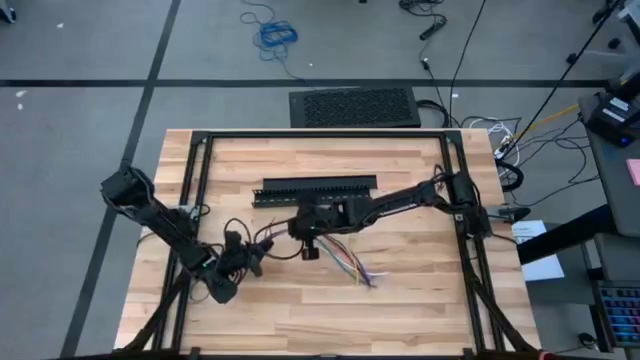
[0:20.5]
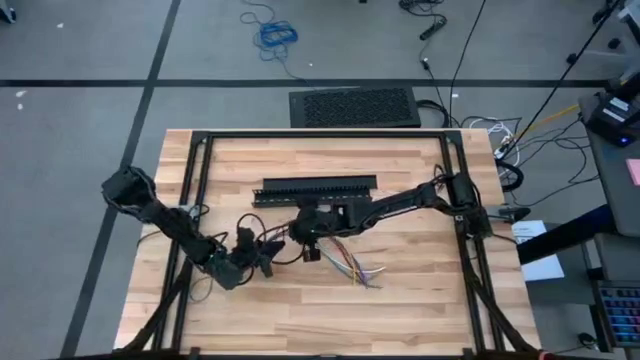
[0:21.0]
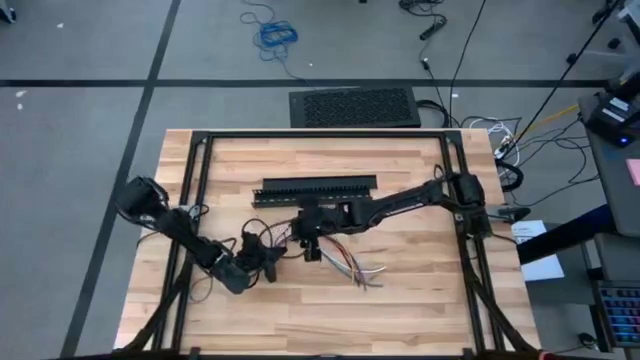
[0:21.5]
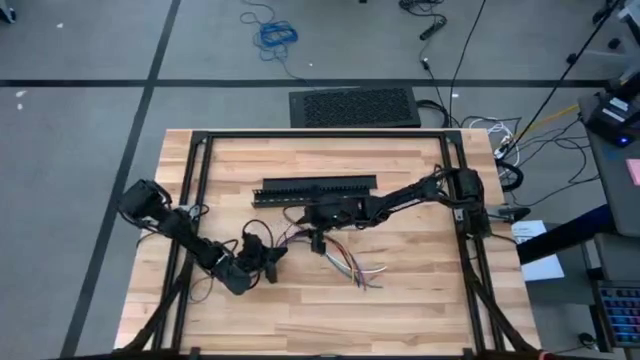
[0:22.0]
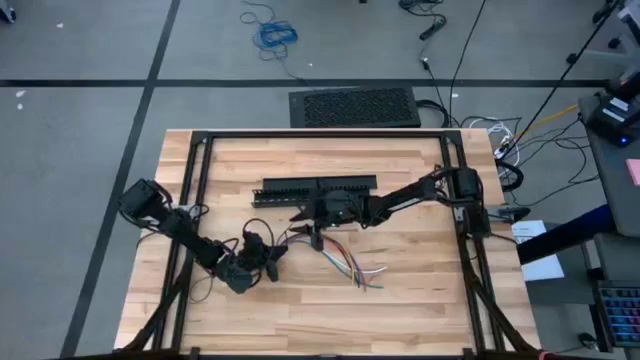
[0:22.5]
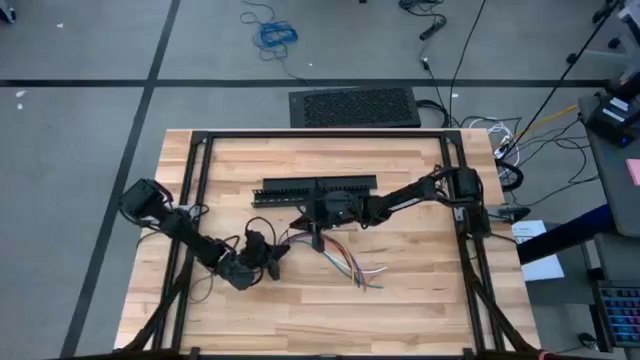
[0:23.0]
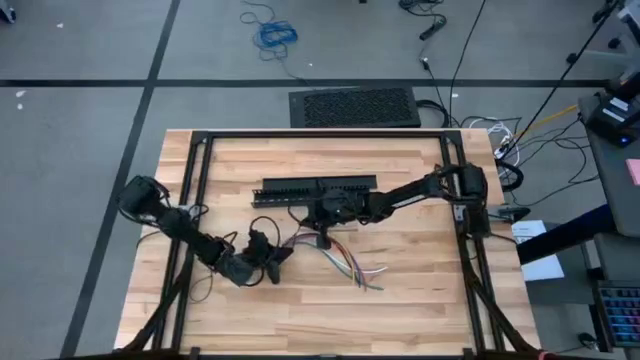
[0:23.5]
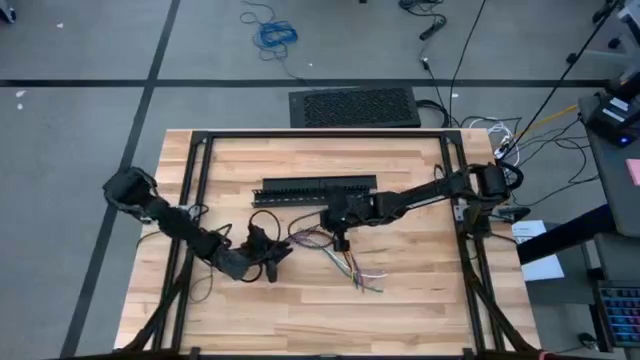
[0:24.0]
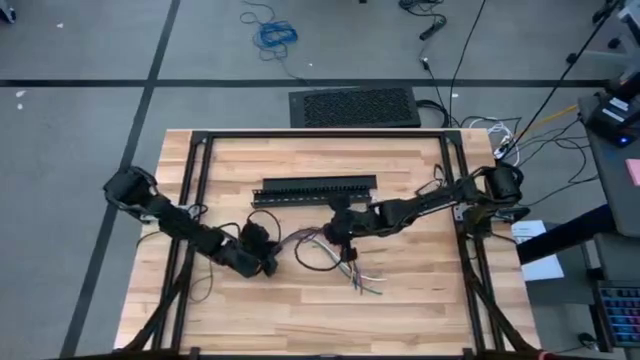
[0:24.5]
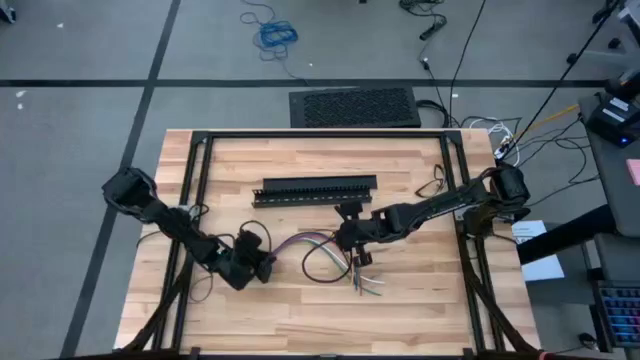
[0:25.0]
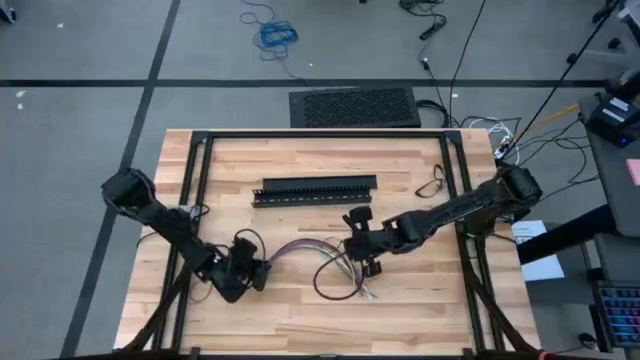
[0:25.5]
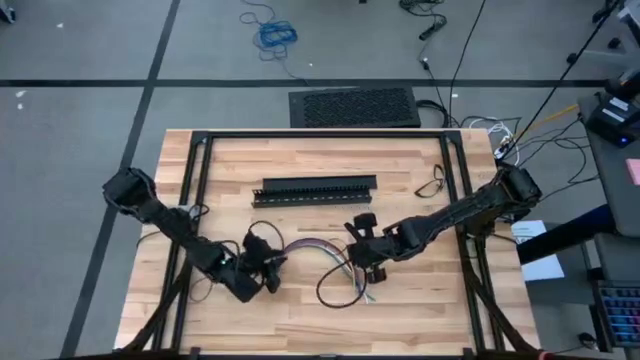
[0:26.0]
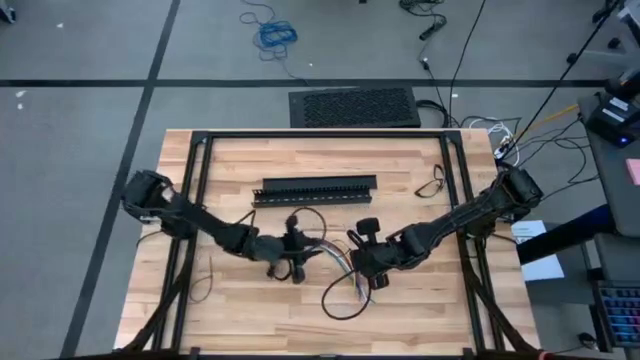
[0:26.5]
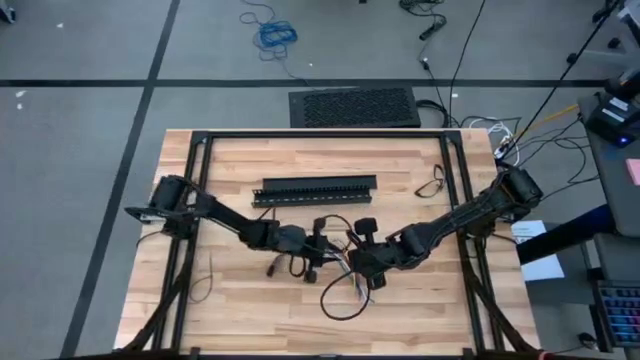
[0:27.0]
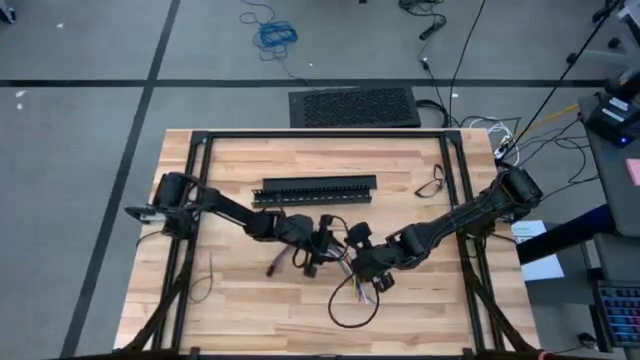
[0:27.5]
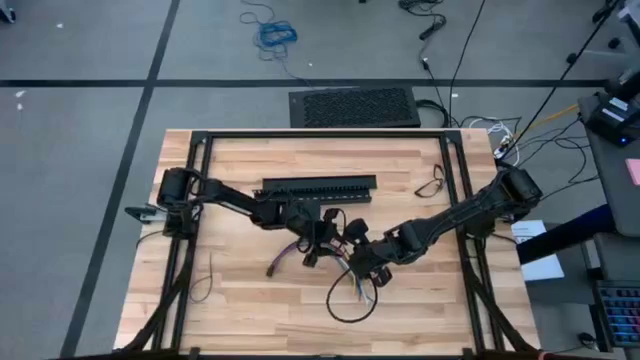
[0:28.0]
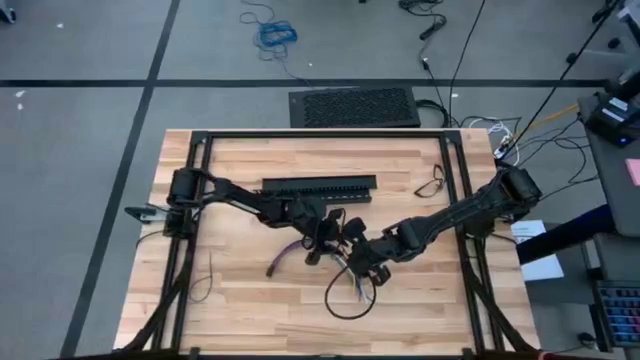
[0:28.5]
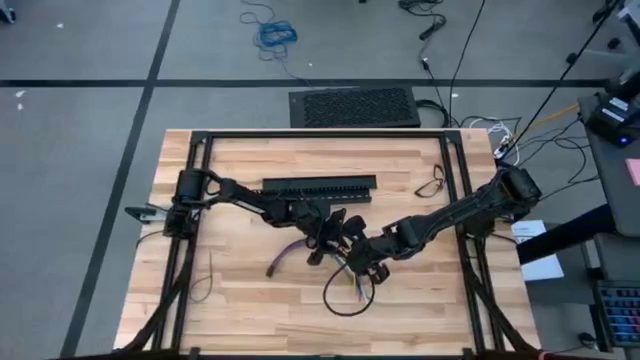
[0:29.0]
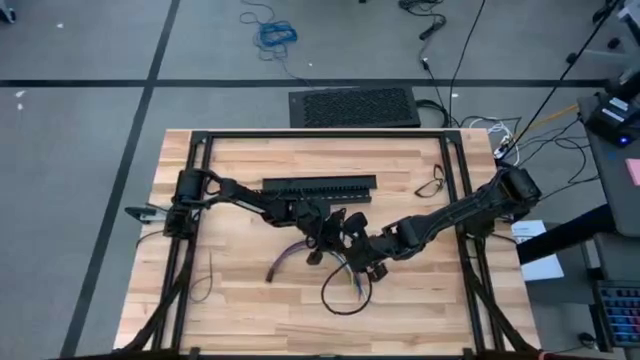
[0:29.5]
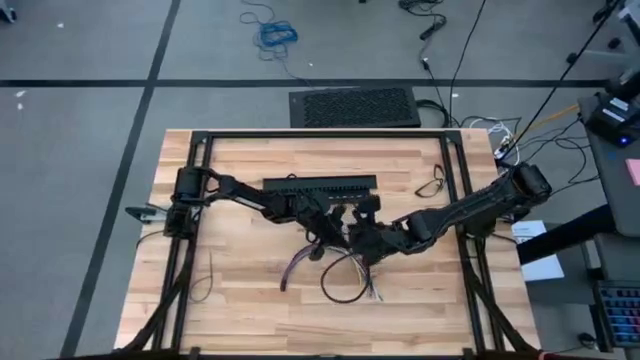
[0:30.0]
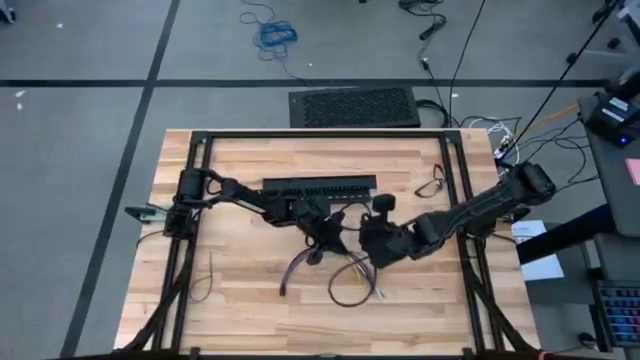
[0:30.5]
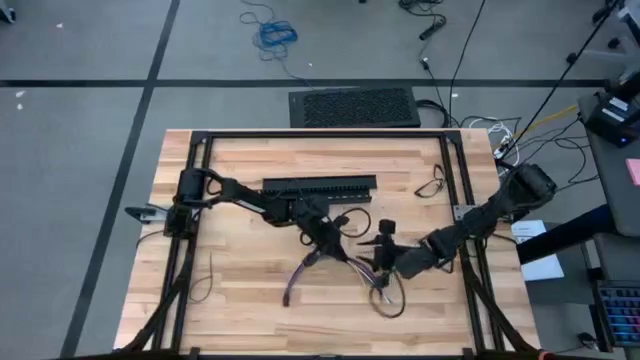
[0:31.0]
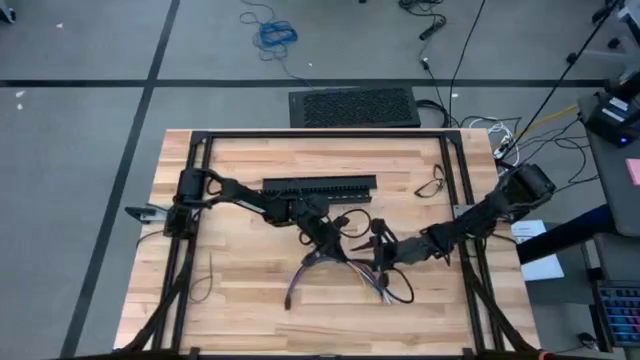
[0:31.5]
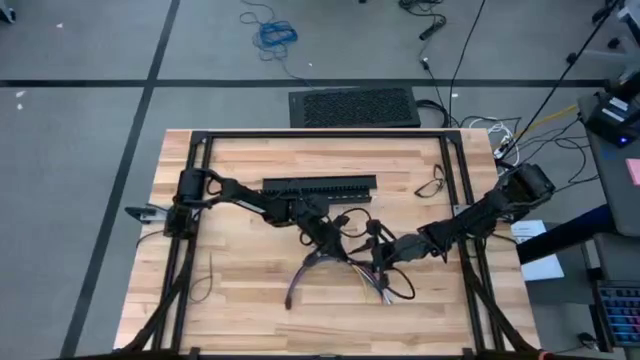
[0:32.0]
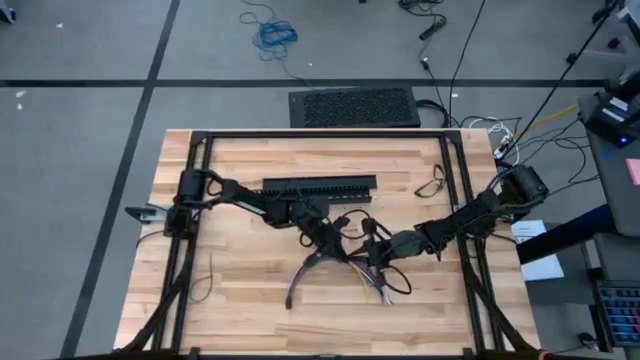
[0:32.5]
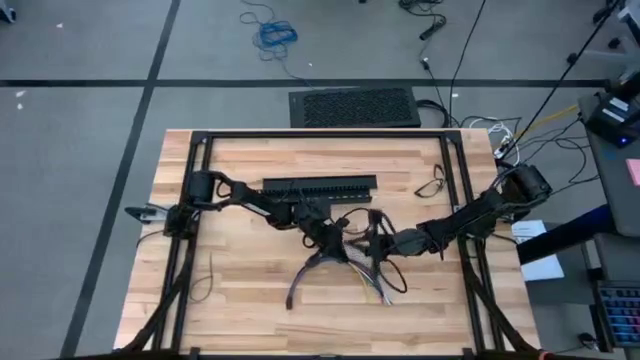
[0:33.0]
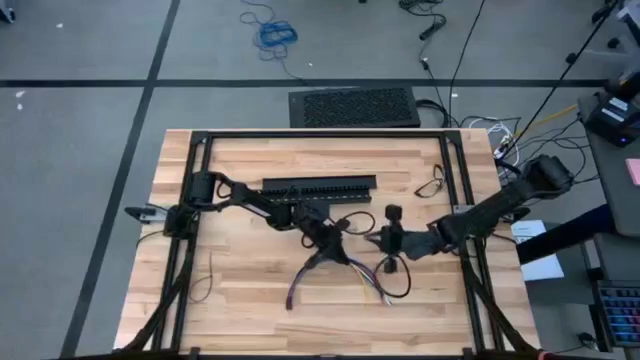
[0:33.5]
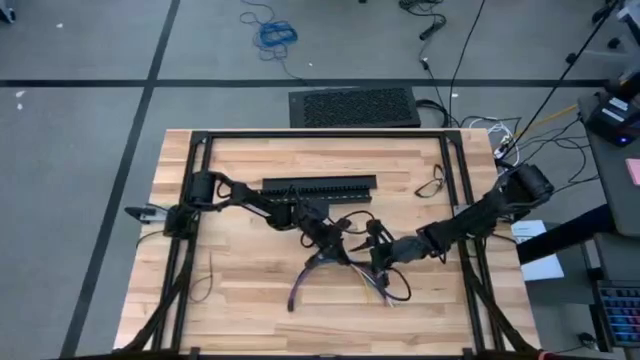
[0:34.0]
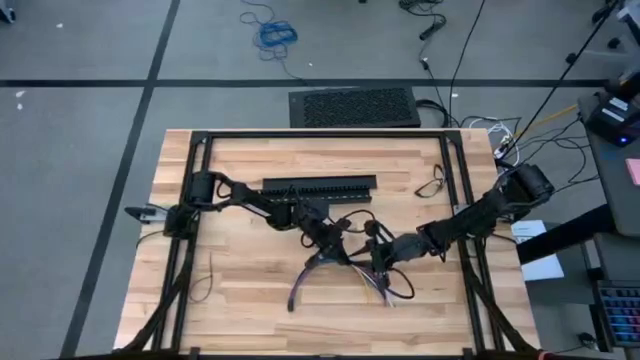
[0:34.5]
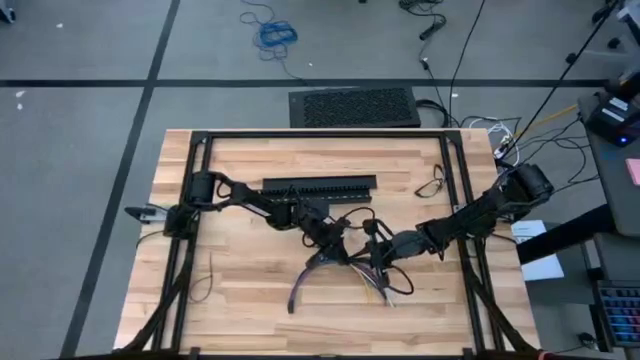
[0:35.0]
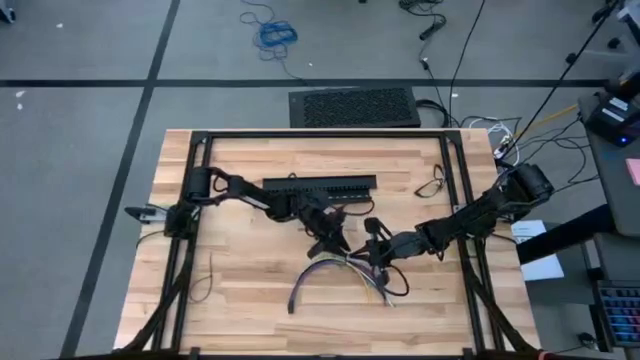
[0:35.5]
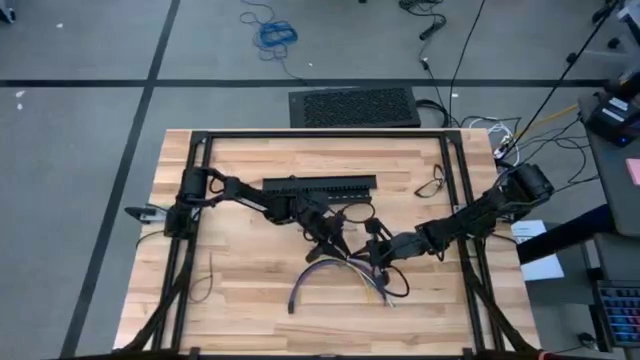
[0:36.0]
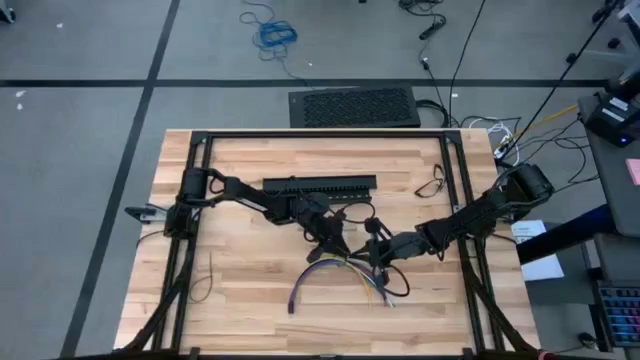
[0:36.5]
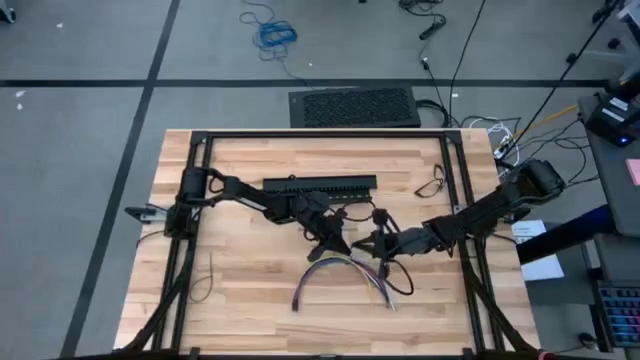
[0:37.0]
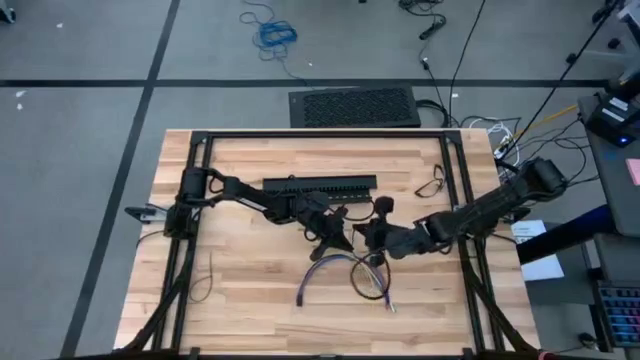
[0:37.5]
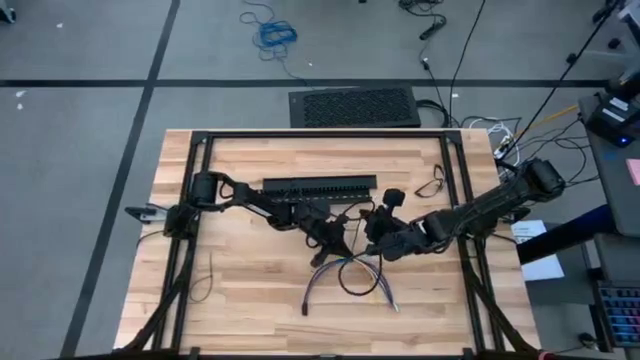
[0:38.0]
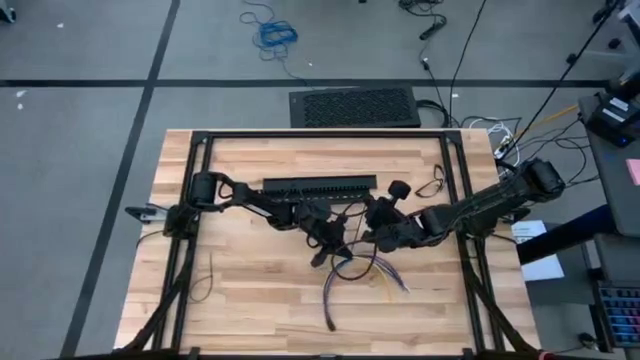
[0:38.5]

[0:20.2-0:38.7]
Task: Ziptie cables
Wrap the cables together using a zip tie

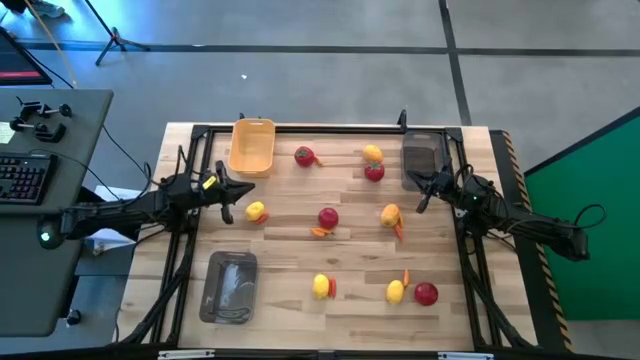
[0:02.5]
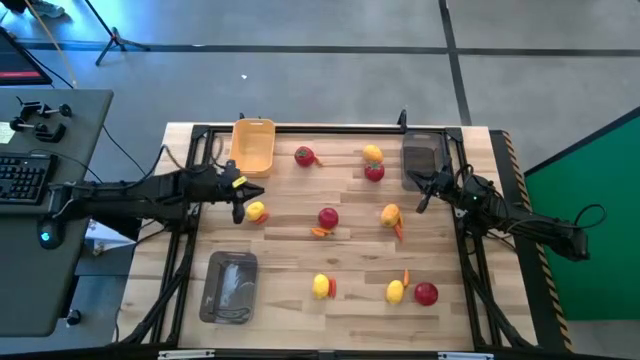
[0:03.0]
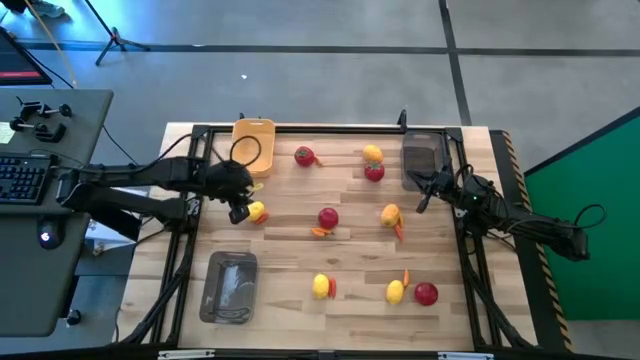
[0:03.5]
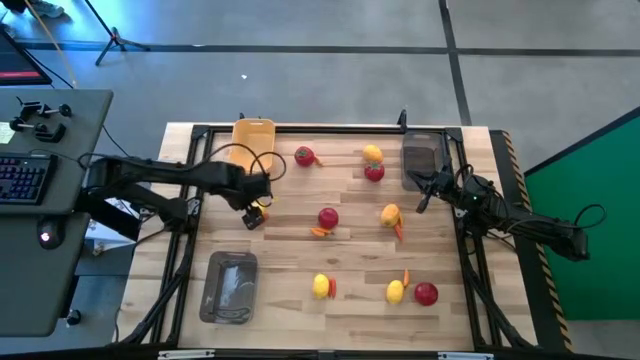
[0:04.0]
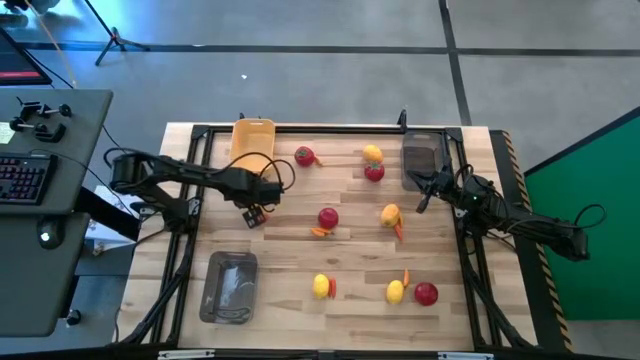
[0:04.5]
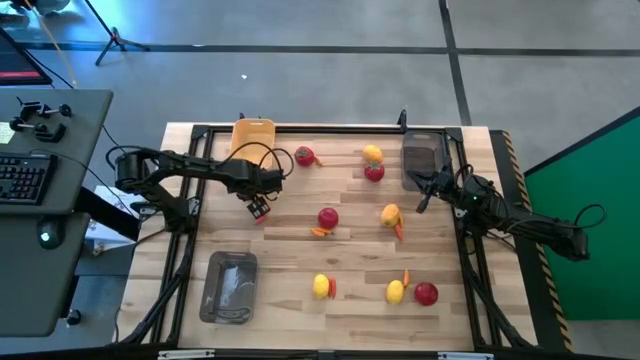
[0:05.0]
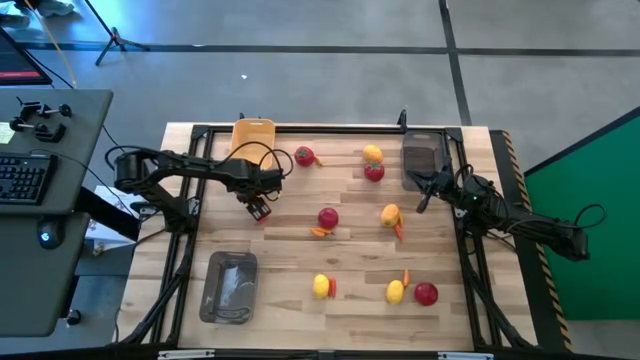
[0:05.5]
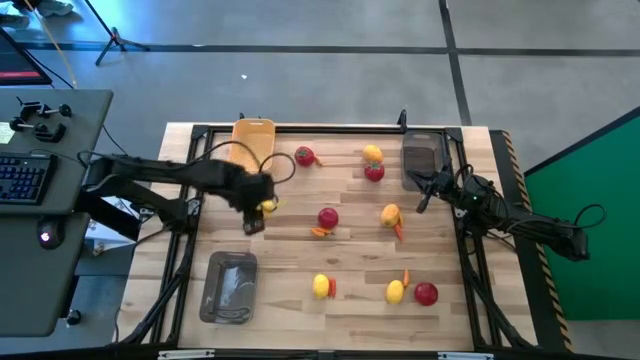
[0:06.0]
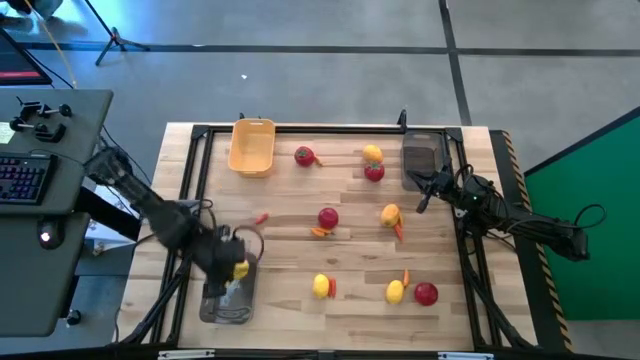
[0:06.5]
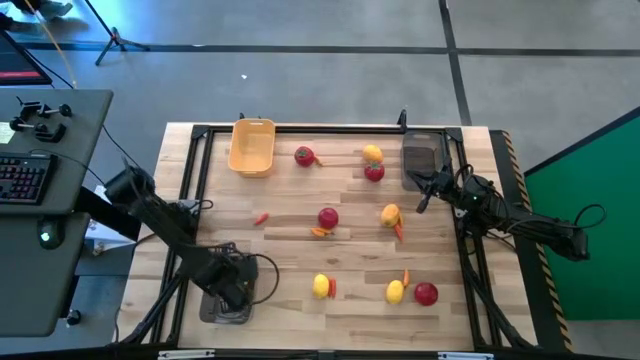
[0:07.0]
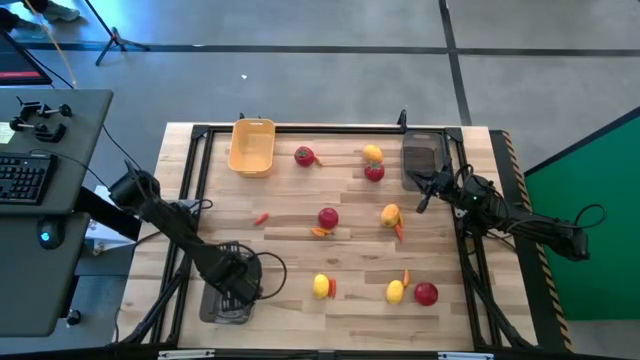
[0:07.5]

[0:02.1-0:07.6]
Task: Sort produce into baskets
Put the lemon into the bottom gray bin
